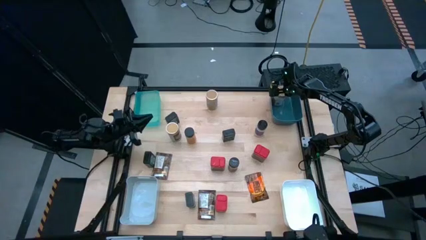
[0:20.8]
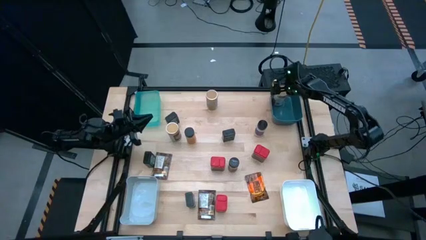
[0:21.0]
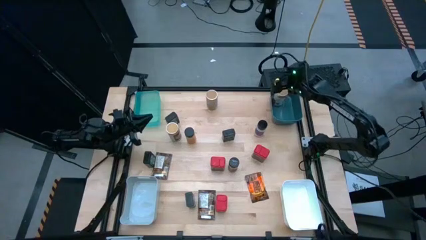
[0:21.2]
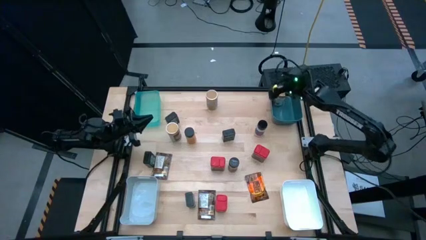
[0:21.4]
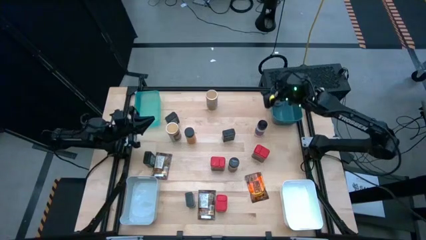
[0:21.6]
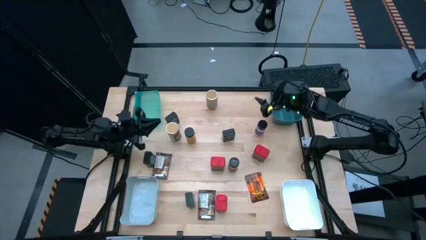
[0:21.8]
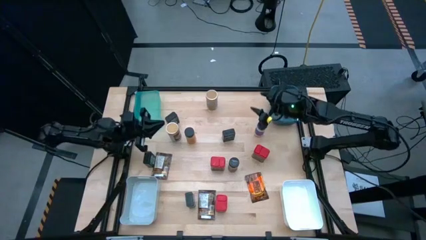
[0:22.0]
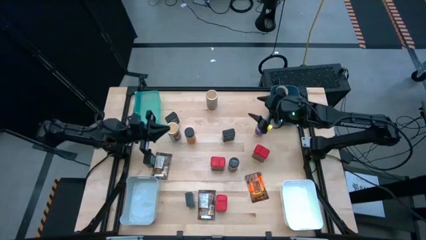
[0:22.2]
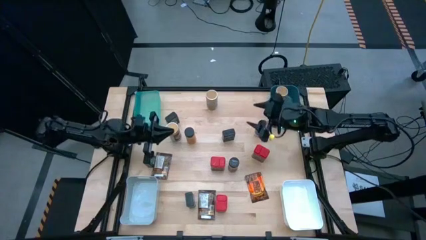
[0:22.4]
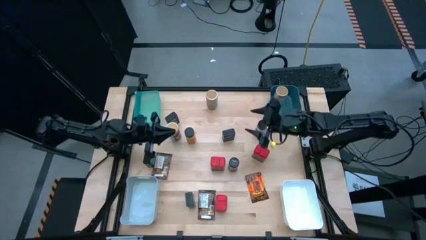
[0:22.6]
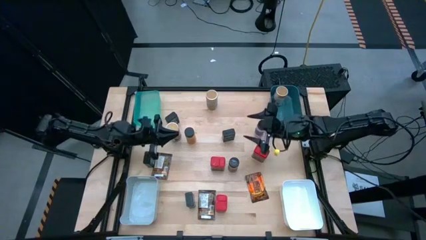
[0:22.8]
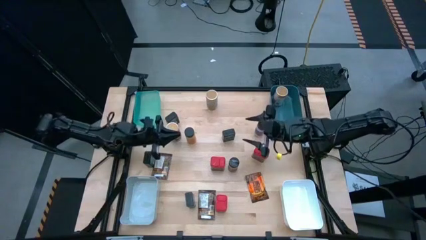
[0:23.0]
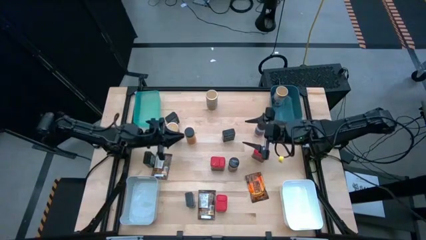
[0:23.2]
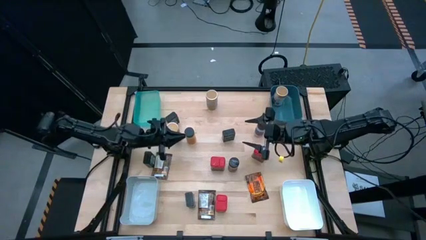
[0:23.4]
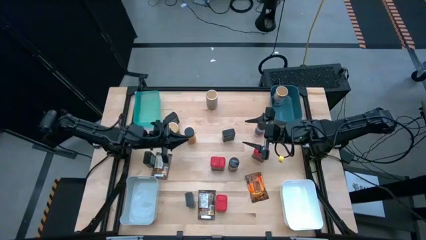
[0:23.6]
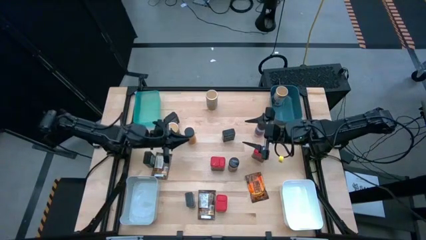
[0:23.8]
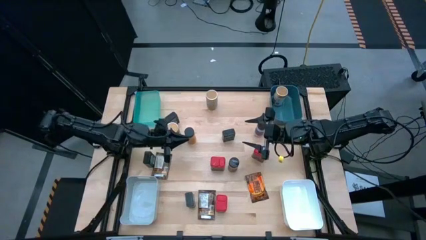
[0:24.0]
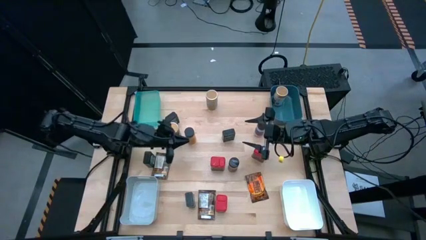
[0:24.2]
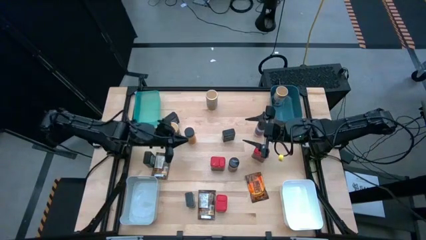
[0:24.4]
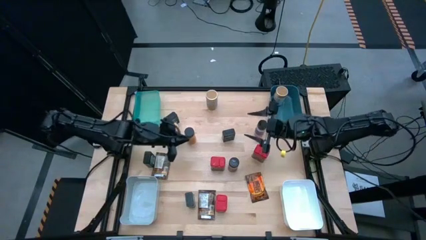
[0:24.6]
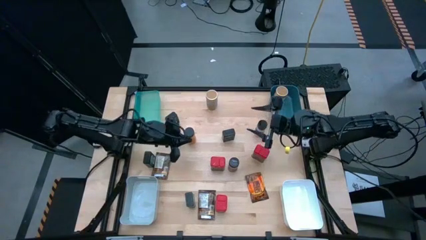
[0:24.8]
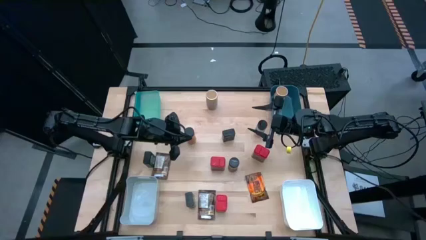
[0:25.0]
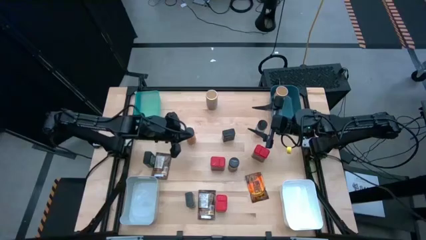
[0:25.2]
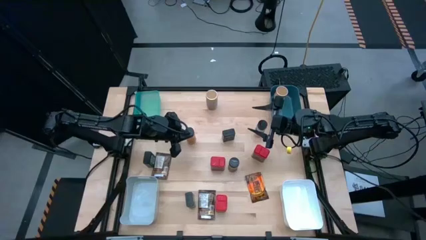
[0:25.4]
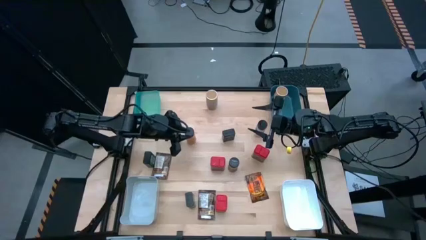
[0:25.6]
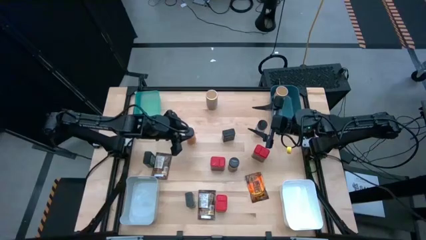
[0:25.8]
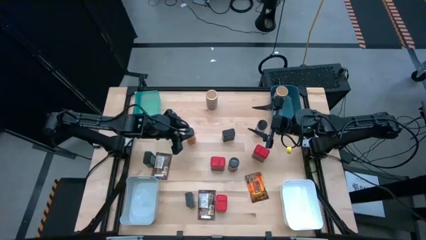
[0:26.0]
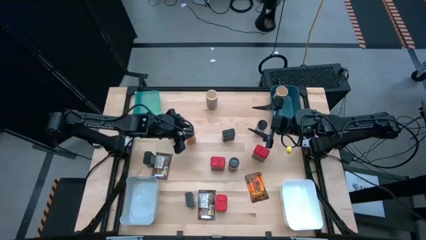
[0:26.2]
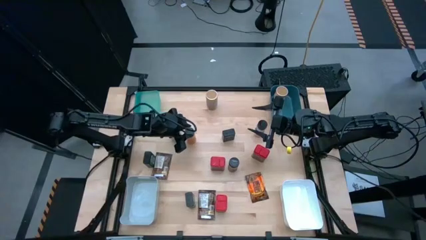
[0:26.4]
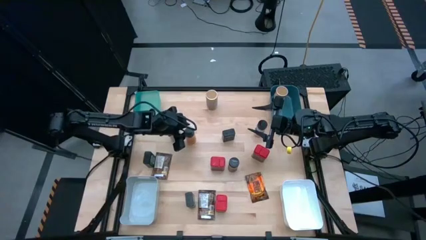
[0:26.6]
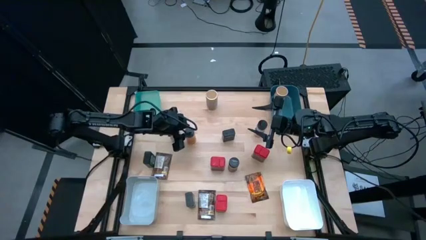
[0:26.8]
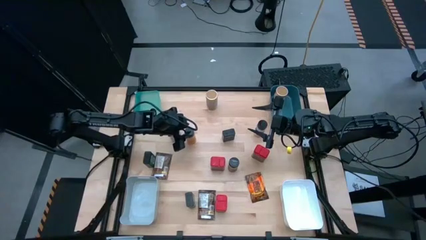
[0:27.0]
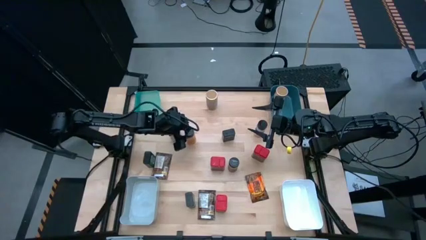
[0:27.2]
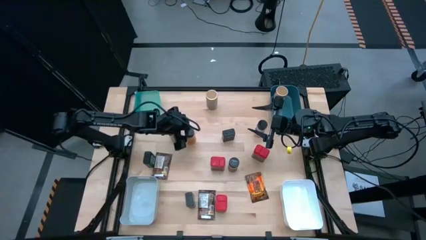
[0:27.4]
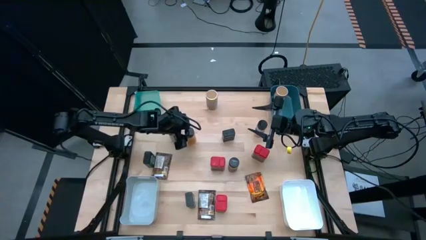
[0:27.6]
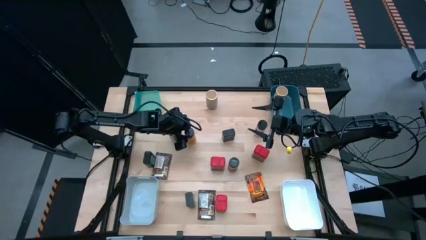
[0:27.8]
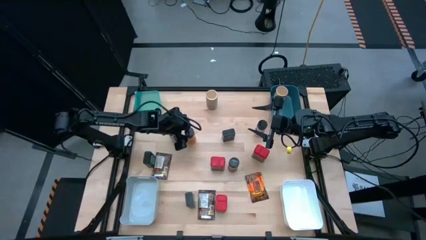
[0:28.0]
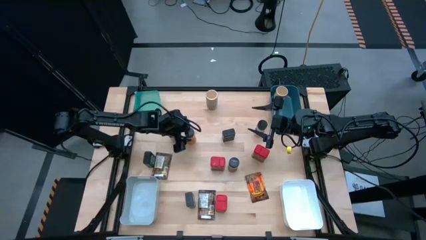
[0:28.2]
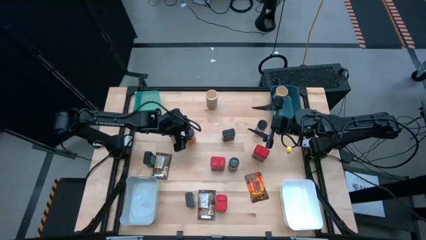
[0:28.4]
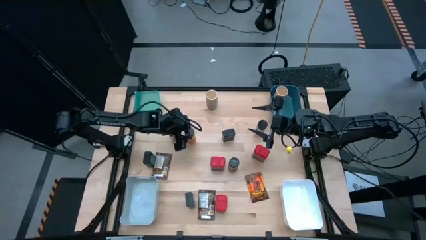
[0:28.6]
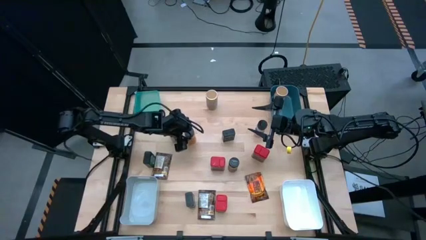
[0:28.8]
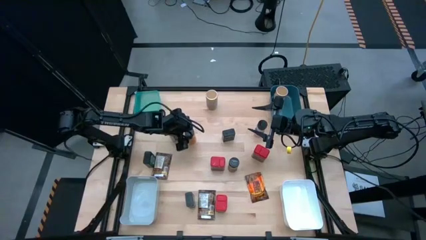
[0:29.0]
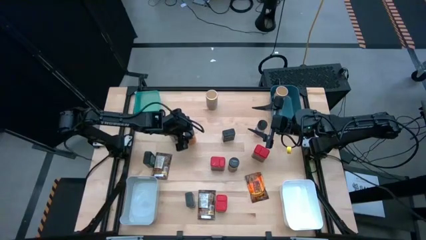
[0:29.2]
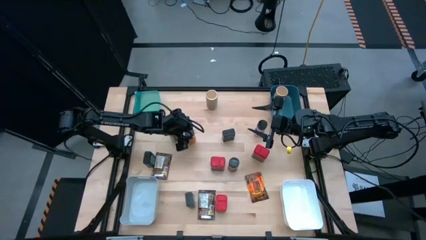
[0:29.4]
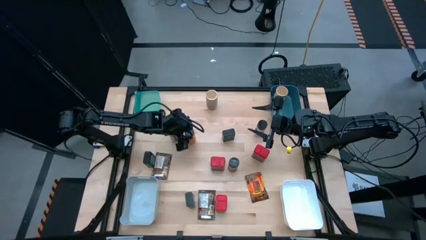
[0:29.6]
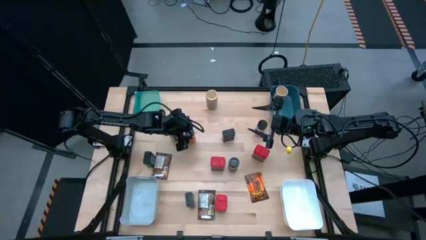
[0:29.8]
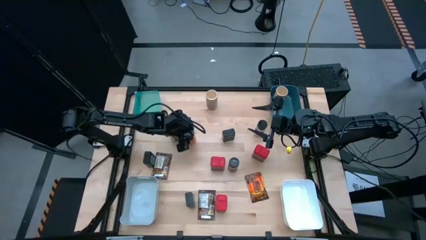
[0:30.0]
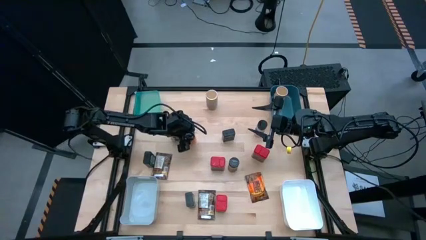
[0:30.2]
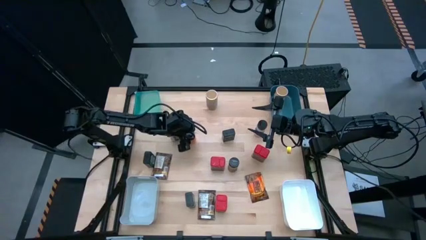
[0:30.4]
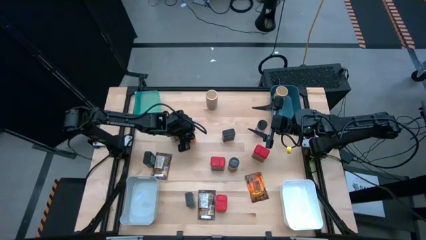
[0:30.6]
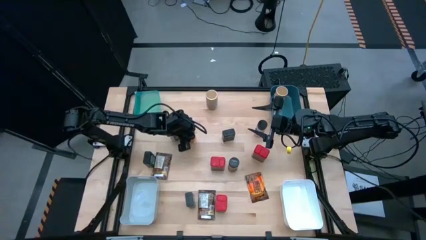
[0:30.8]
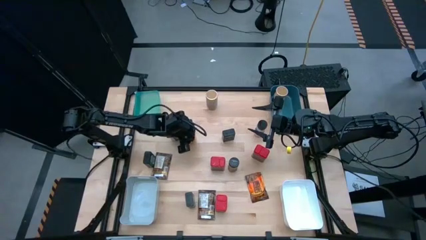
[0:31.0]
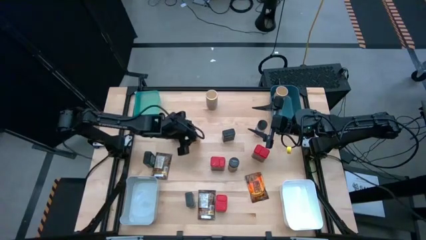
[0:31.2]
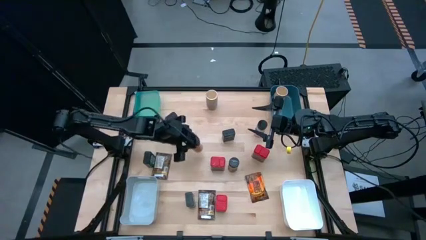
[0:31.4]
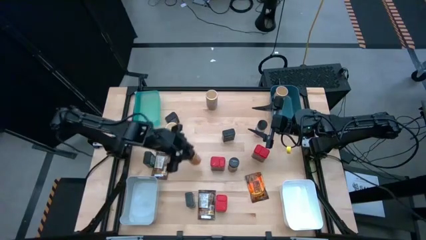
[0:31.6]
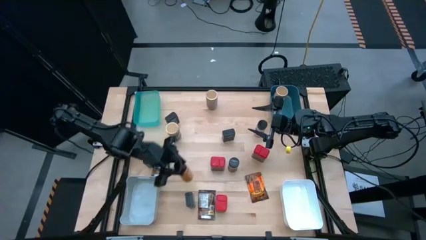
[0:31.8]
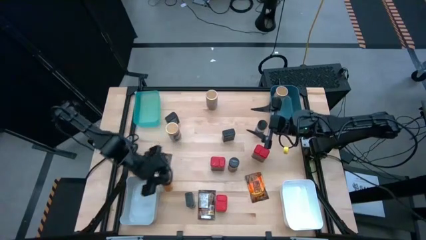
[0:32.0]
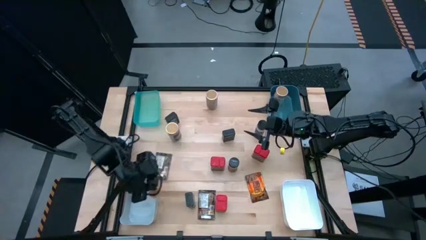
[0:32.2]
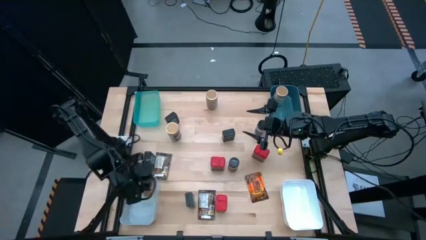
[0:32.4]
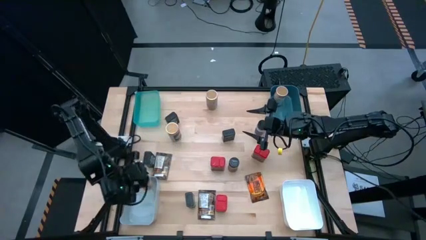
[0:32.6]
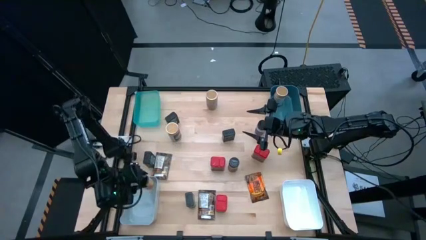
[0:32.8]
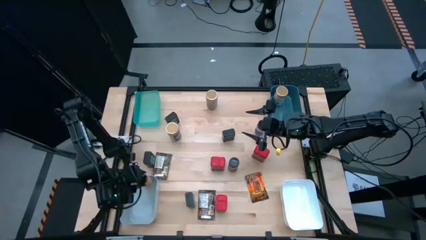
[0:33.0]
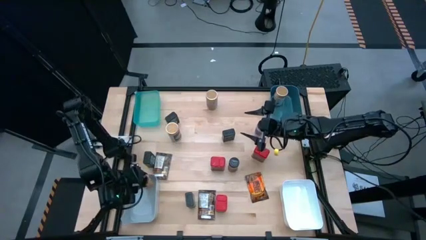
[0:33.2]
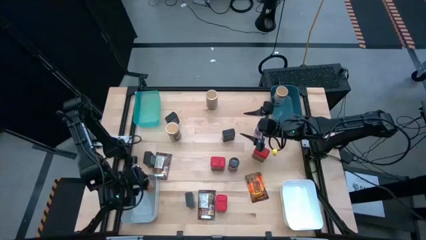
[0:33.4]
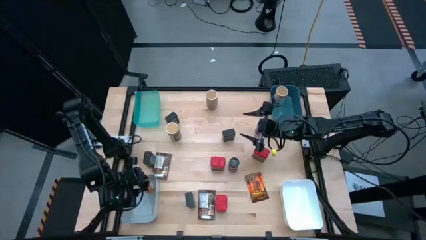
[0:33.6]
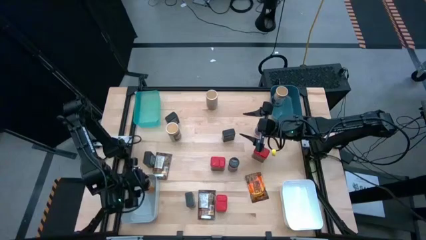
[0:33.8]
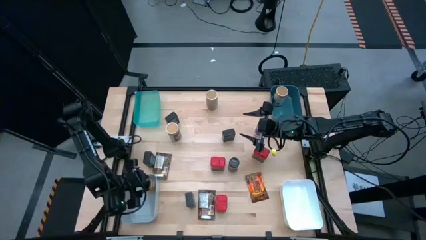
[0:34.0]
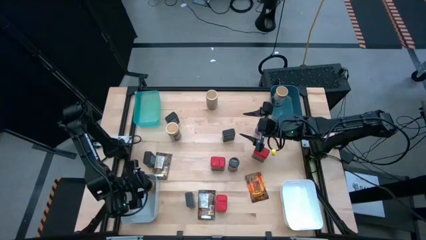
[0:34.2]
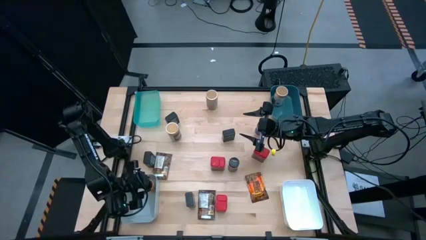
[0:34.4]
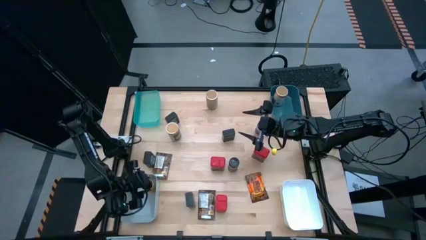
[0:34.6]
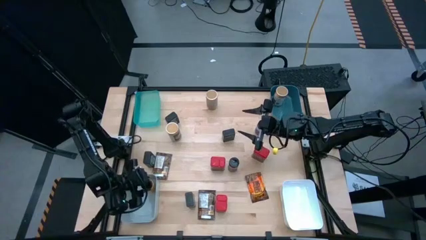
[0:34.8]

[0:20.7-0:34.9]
Task: Sort spices by type
Put the top left orange seasoning bottle into the gray bin
